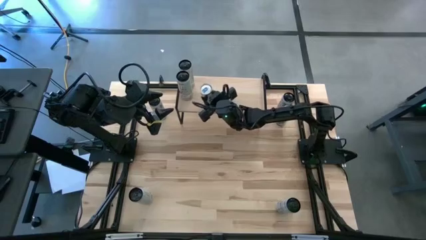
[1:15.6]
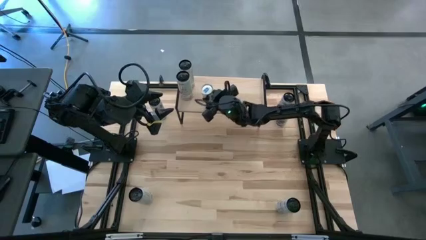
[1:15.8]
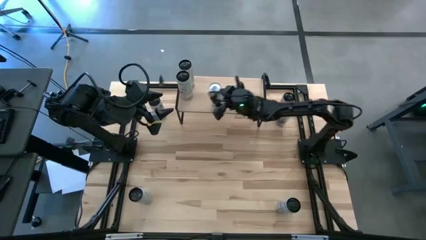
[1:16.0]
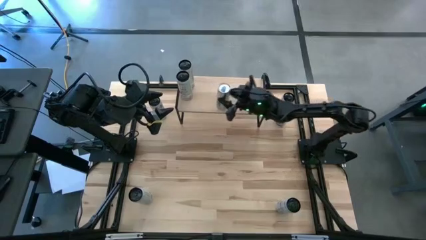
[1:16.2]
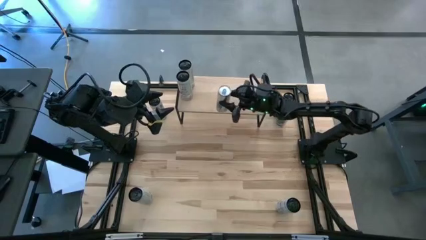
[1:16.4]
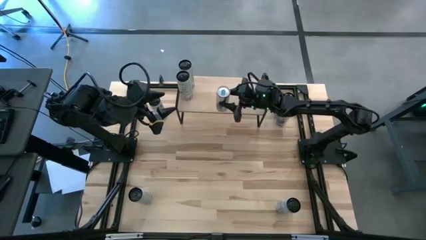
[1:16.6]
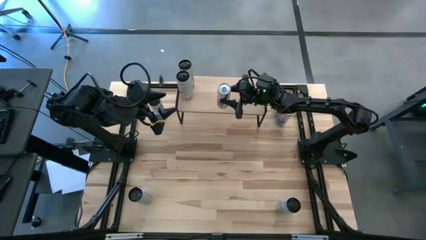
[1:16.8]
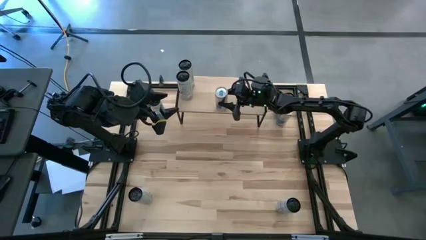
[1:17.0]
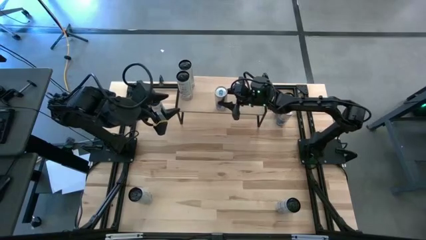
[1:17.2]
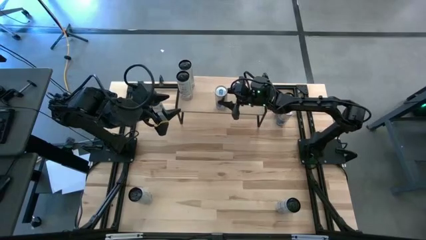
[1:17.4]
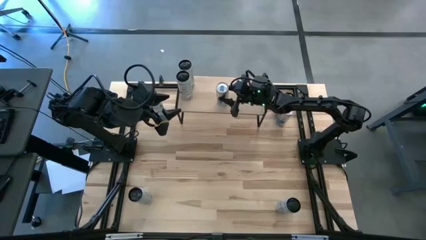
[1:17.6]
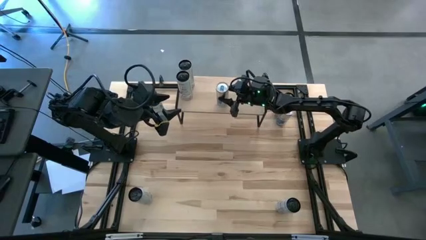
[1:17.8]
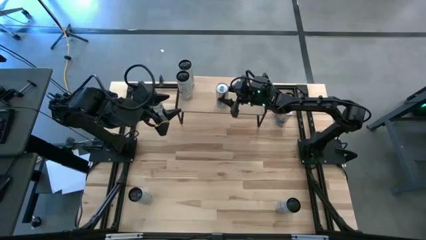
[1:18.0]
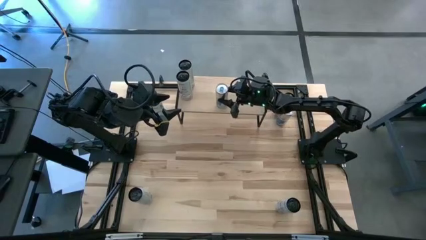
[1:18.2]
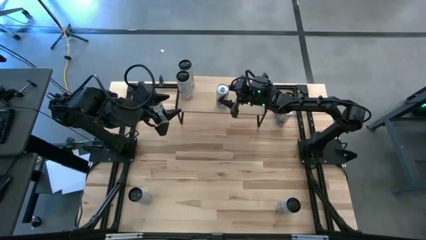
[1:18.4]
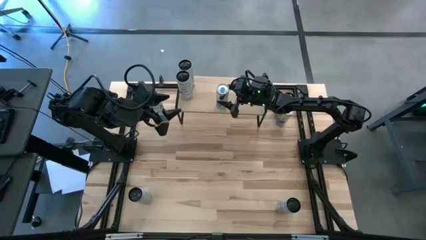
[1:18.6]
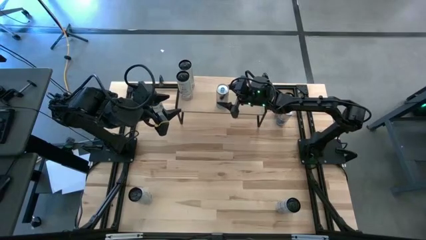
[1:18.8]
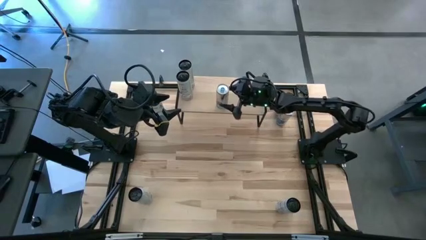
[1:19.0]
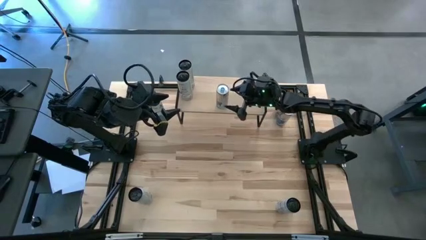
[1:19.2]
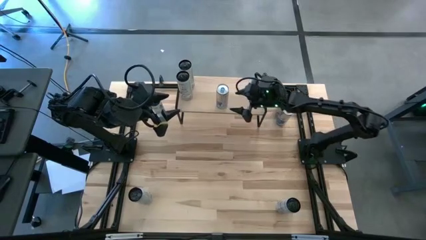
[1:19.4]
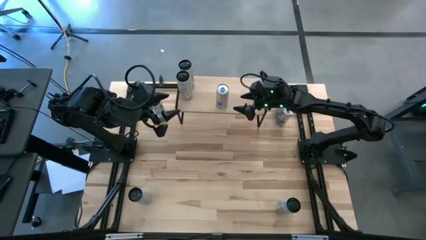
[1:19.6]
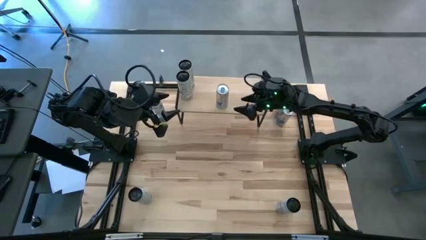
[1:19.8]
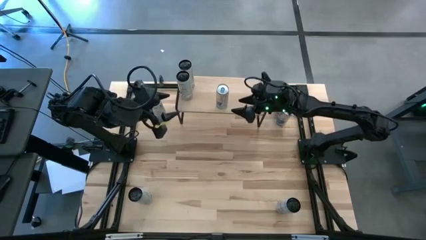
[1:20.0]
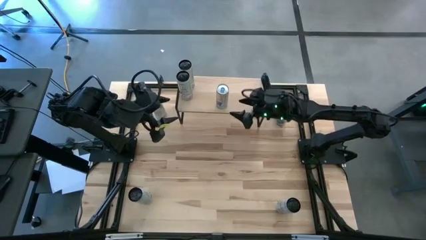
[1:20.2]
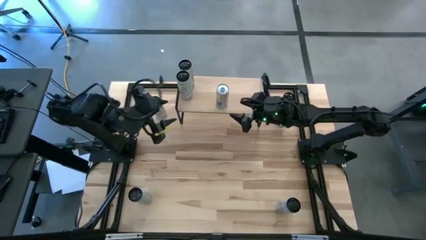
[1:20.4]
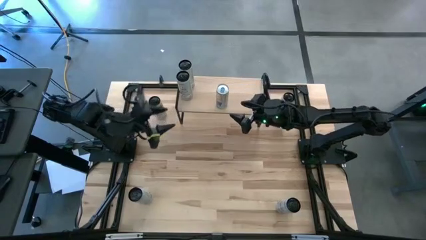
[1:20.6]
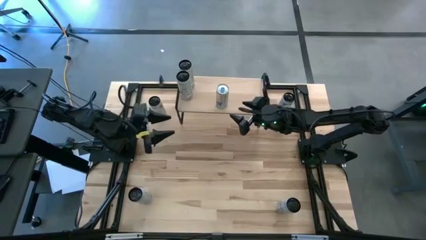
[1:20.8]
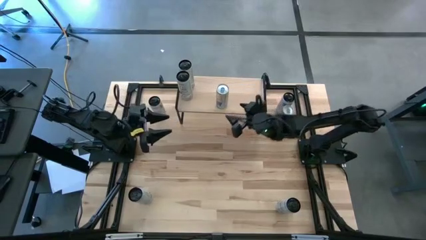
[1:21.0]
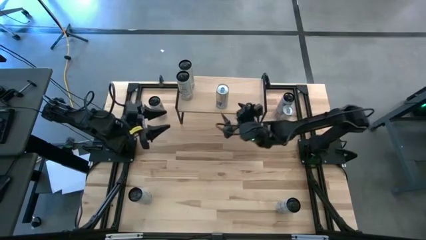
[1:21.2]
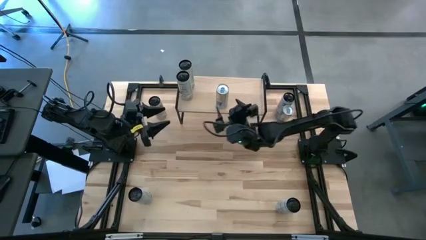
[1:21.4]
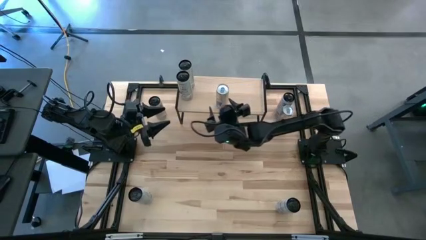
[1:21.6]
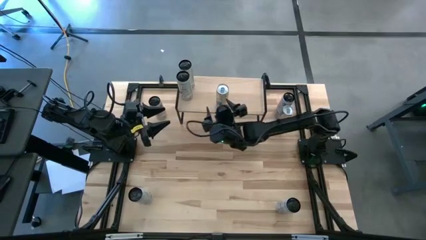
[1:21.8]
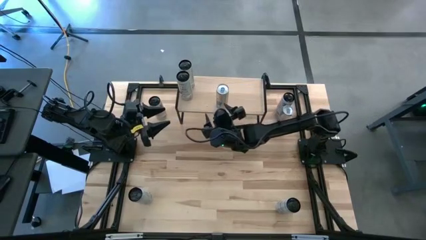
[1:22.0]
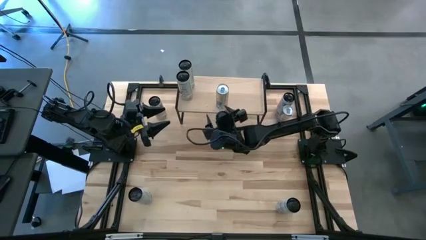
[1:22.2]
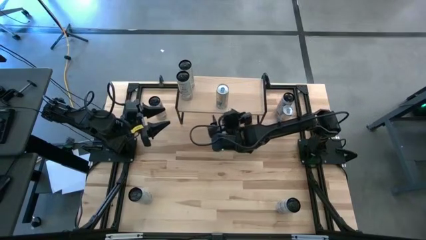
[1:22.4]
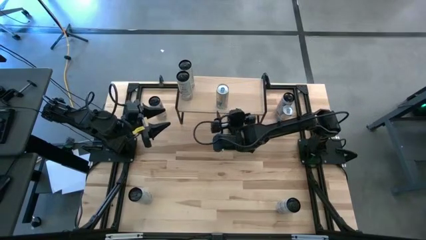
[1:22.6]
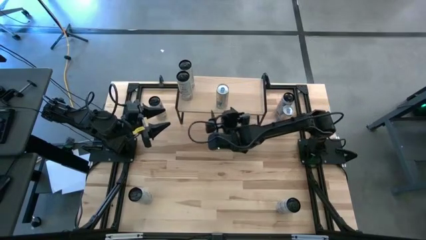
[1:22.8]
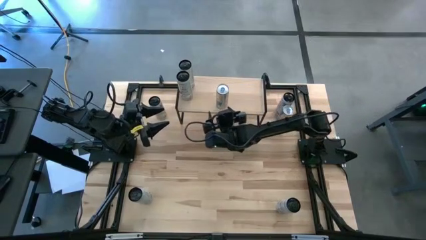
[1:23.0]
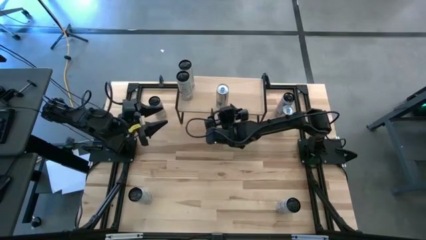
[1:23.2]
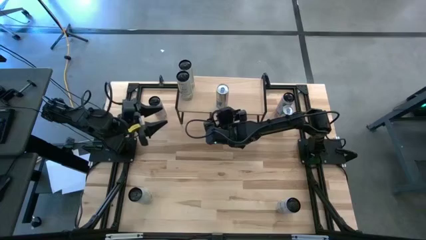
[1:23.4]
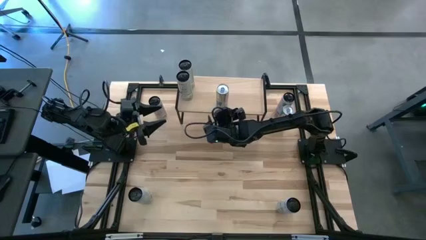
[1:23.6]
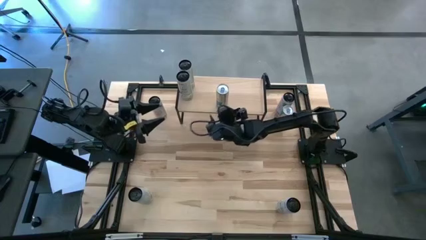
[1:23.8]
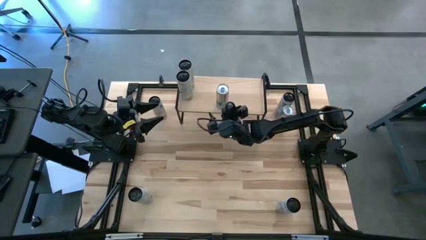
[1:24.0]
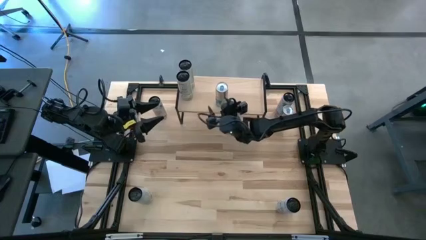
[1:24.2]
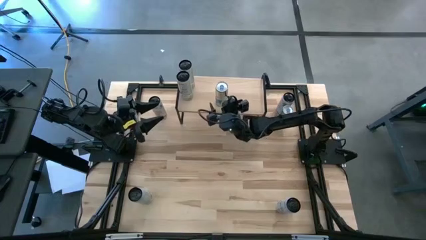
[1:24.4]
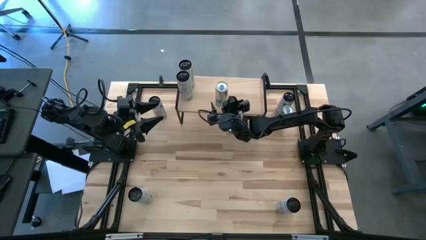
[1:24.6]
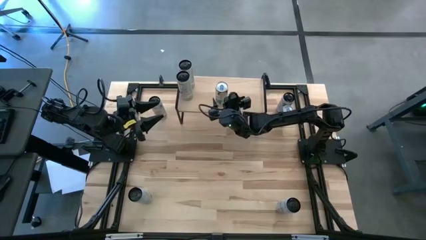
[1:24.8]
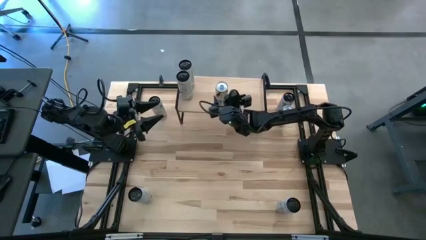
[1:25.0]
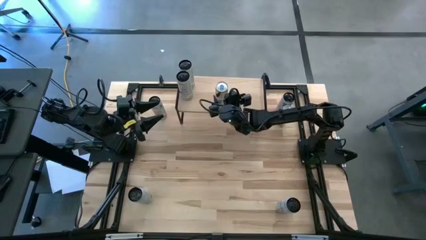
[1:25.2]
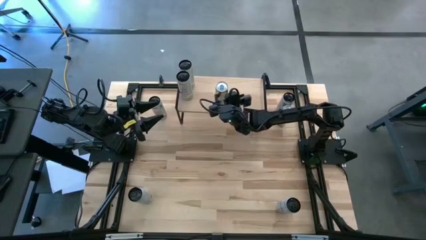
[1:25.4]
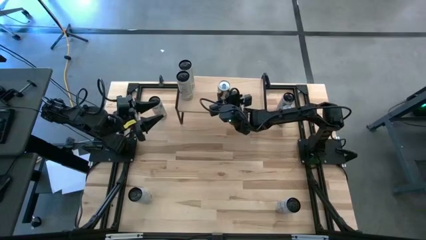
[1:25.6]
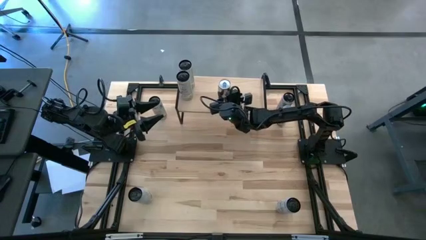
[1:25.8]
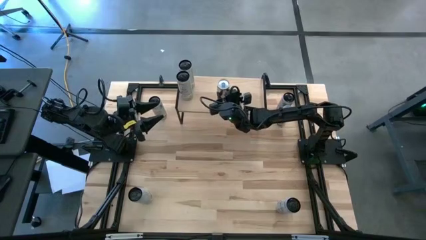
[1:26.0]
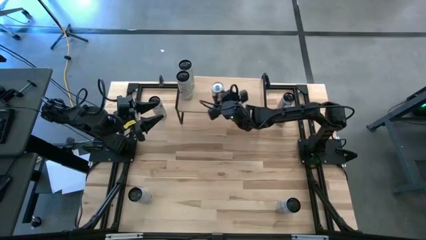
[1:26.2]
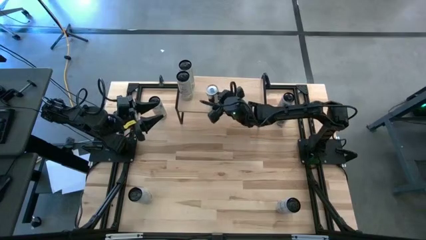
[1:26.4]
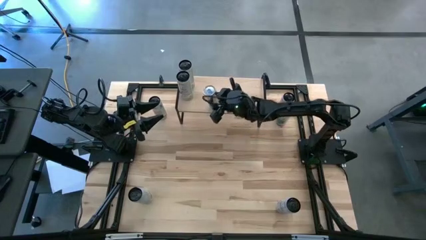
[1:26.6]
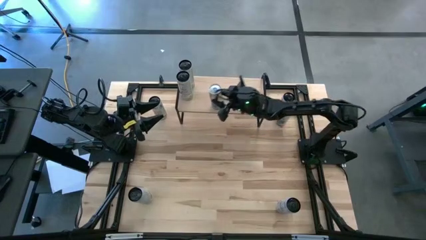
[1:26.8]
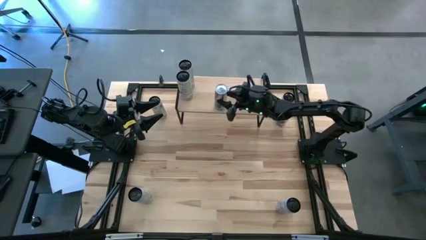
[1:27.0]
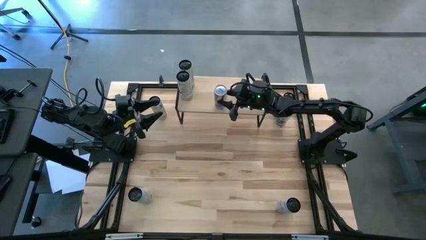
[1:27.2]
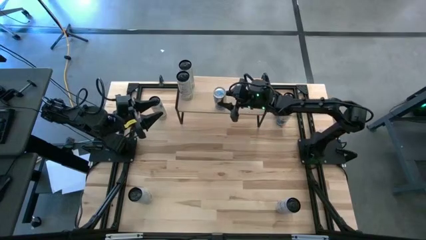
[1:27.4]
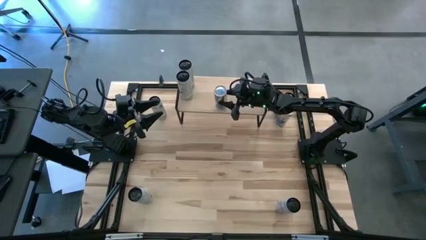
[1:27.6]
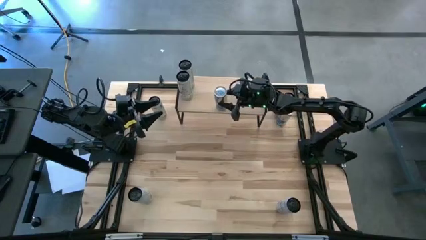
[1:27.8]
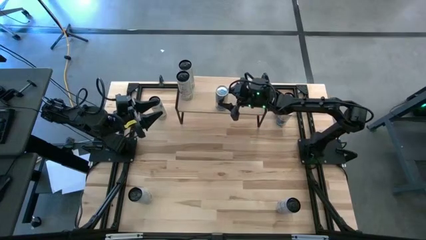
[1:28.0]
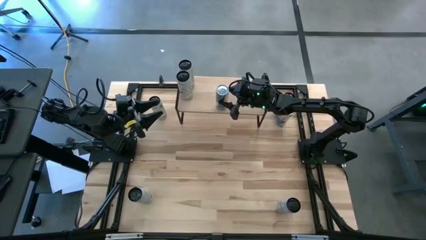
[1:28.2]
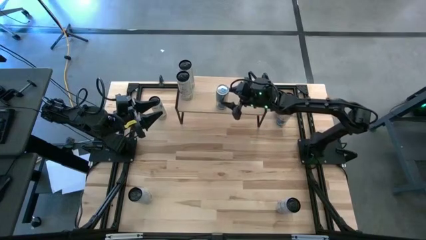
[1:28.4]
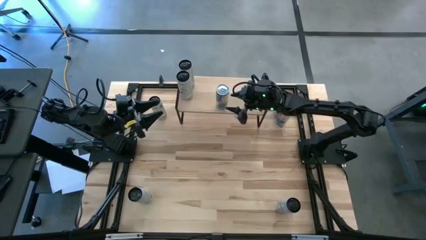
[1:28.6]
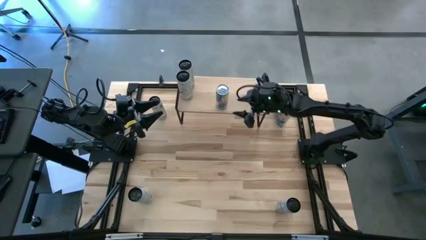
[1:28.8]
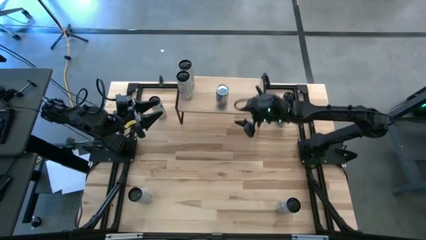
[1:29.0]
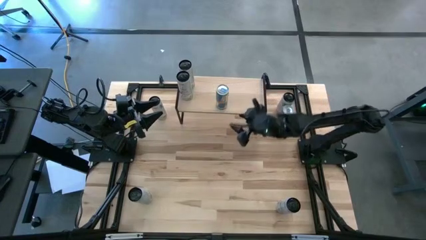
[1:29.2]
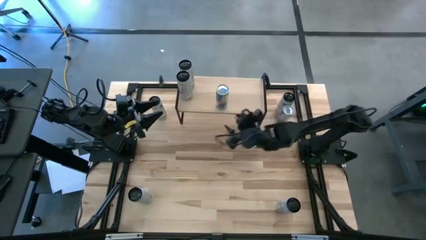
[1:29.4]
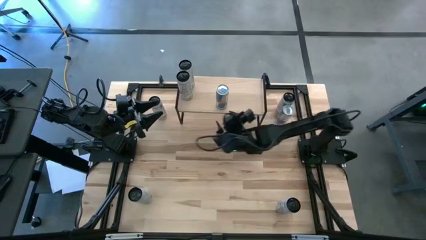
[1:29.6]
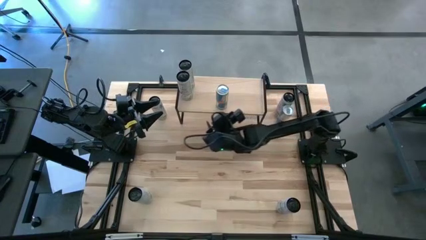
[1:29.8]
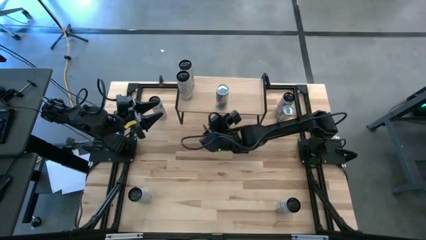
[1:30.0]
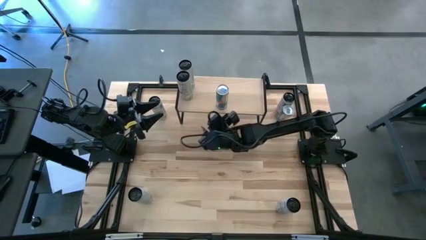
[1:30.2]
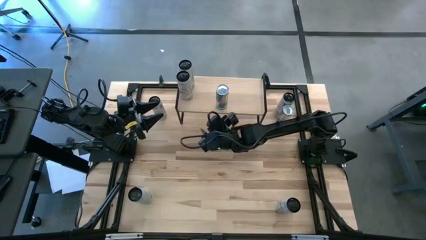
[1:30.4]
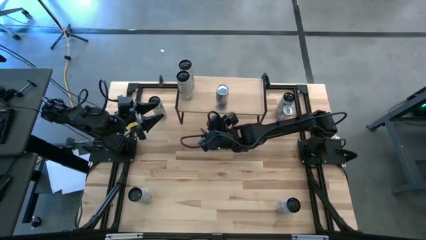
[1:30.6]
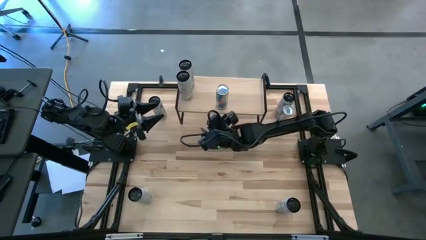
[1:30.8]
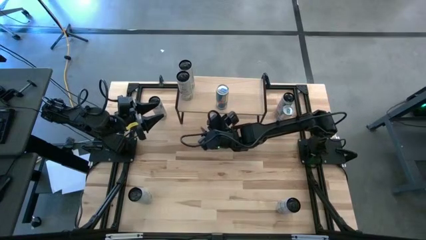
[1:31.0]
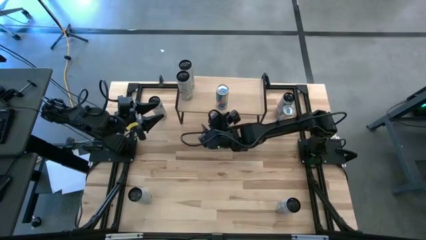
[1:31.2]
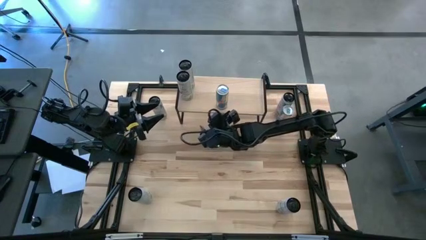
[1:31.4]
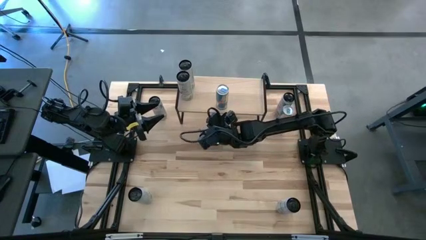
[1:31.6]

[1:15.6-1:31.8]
Task: Place canned beverage on shelf
Put the left blue soda can on the shelf
